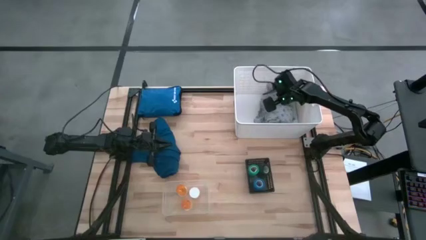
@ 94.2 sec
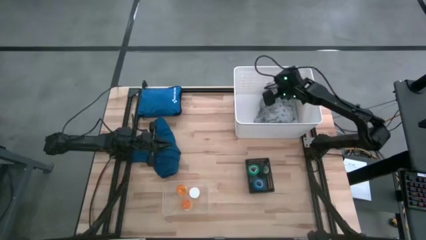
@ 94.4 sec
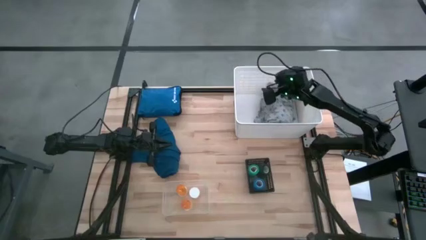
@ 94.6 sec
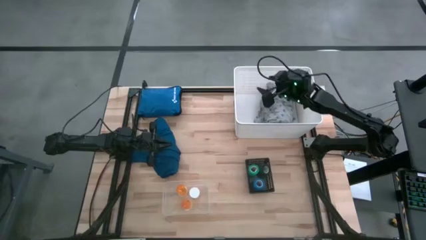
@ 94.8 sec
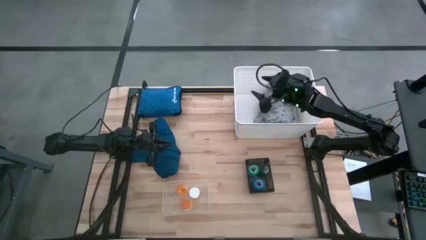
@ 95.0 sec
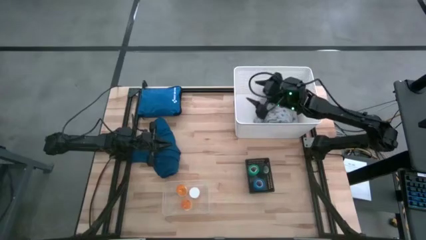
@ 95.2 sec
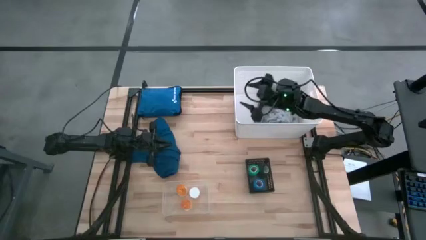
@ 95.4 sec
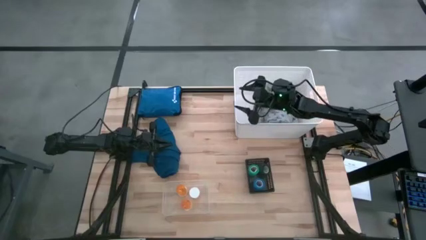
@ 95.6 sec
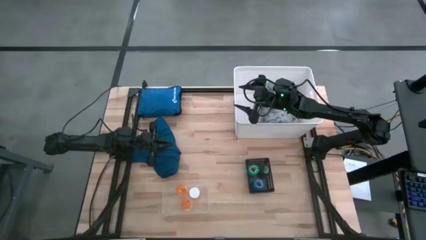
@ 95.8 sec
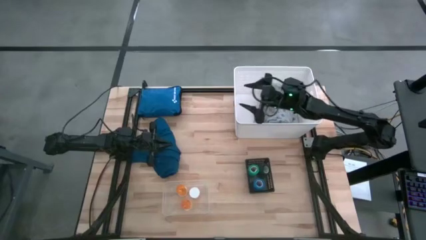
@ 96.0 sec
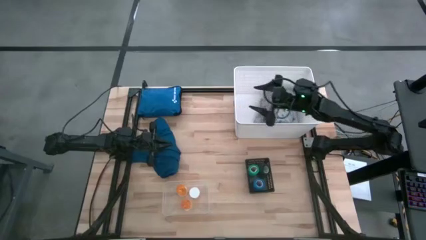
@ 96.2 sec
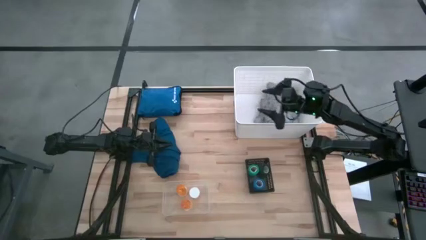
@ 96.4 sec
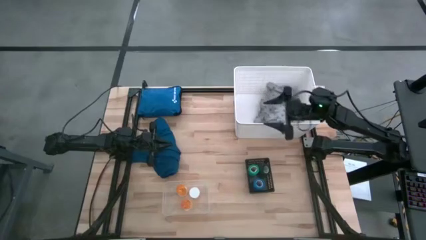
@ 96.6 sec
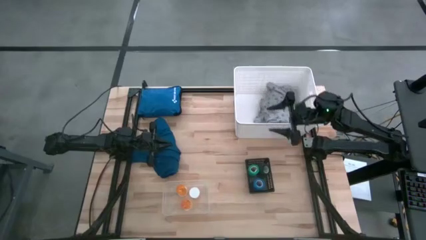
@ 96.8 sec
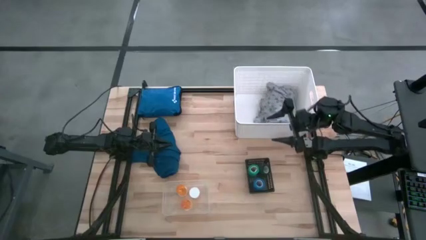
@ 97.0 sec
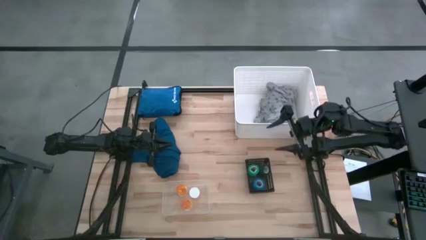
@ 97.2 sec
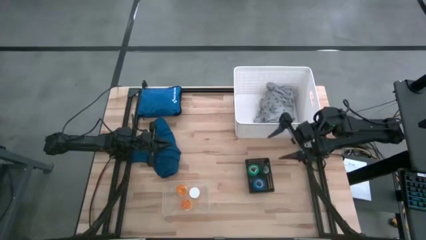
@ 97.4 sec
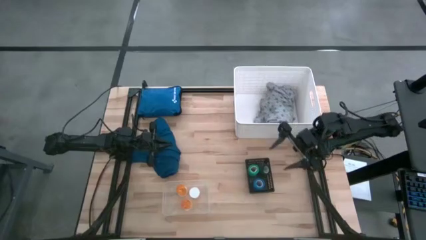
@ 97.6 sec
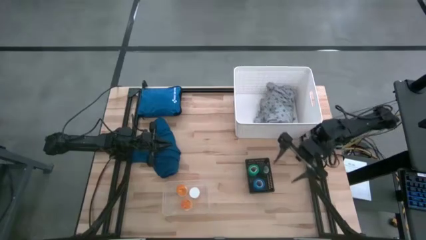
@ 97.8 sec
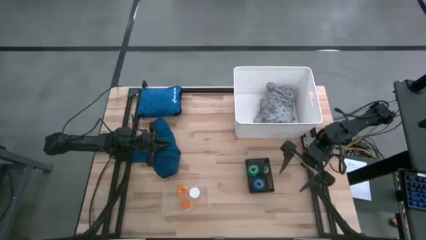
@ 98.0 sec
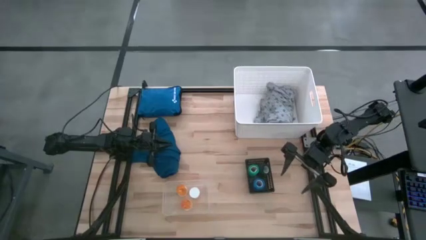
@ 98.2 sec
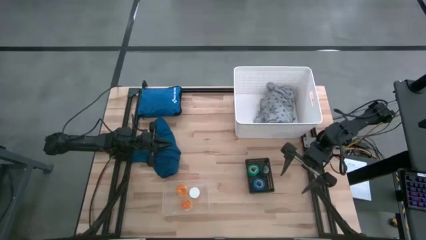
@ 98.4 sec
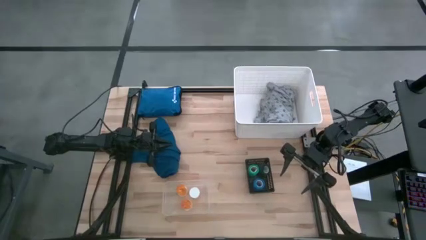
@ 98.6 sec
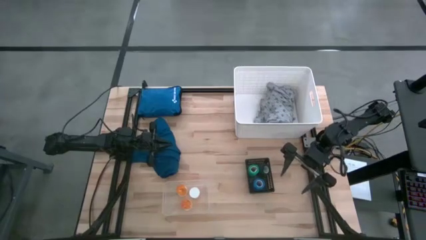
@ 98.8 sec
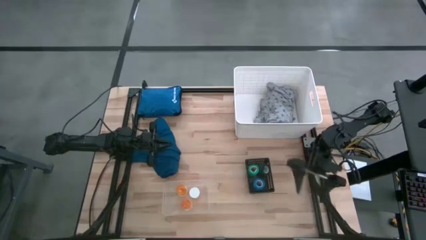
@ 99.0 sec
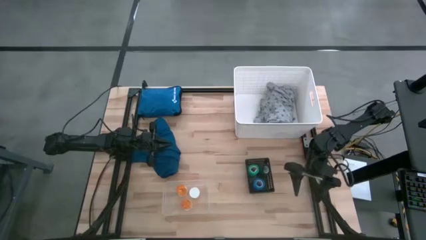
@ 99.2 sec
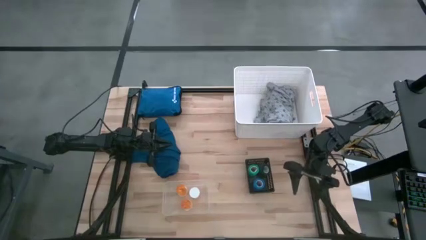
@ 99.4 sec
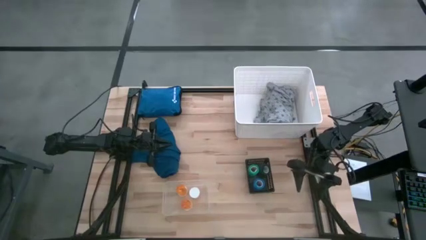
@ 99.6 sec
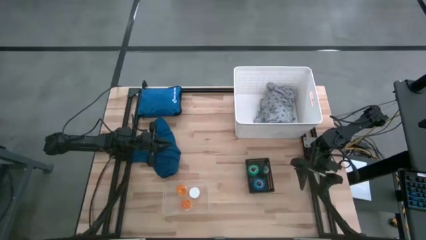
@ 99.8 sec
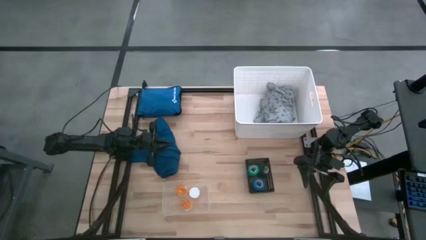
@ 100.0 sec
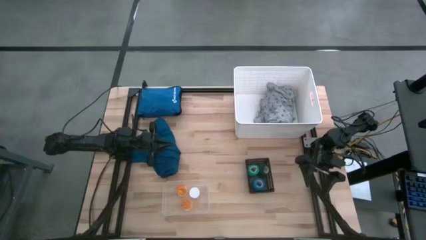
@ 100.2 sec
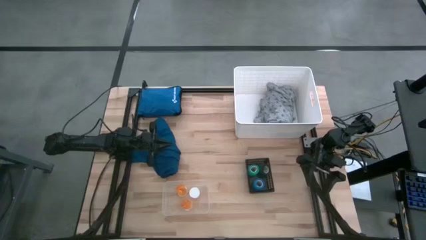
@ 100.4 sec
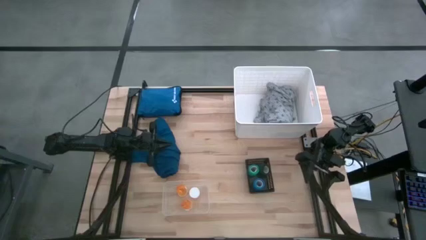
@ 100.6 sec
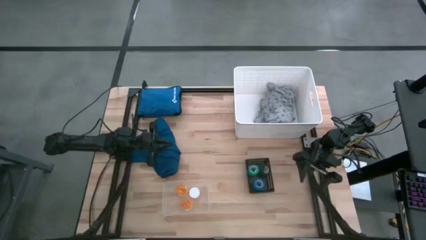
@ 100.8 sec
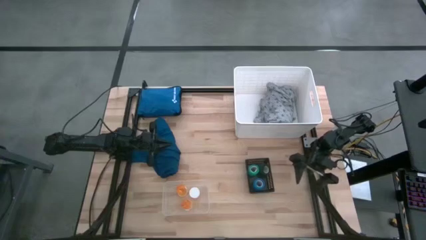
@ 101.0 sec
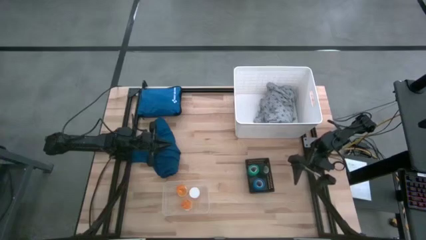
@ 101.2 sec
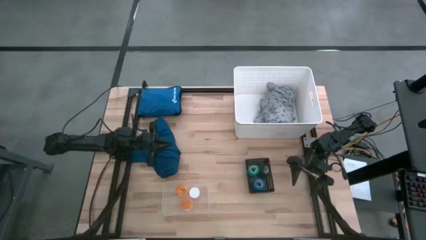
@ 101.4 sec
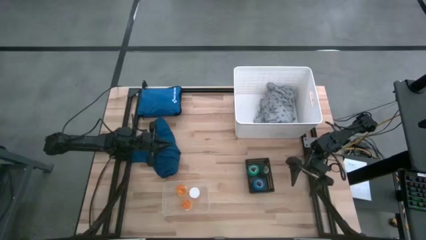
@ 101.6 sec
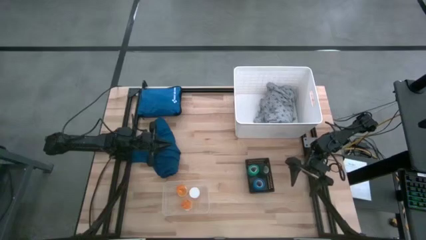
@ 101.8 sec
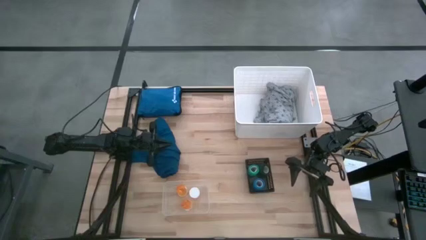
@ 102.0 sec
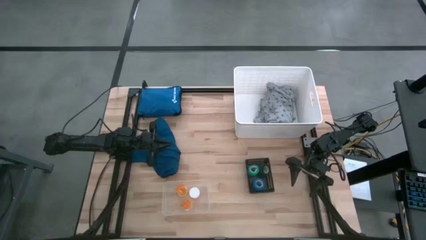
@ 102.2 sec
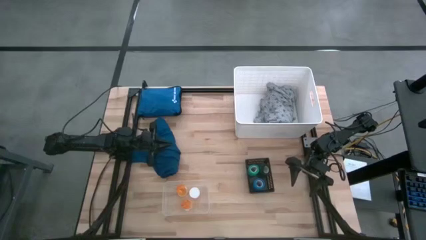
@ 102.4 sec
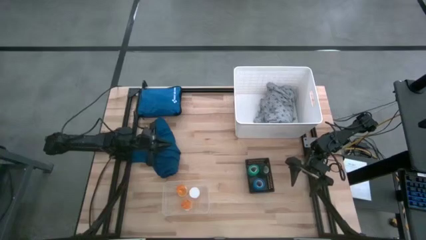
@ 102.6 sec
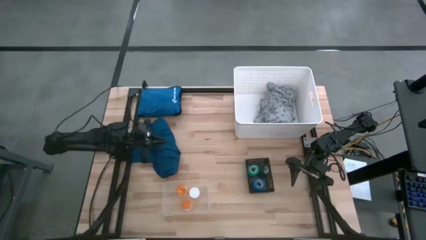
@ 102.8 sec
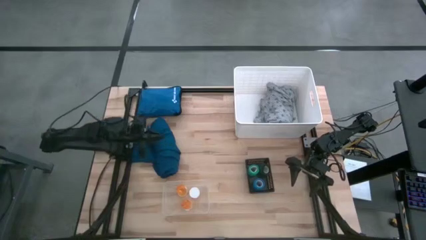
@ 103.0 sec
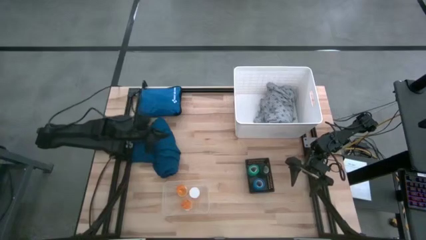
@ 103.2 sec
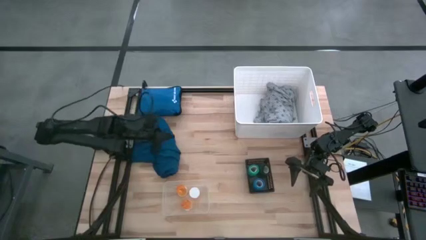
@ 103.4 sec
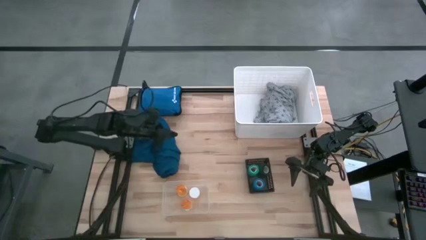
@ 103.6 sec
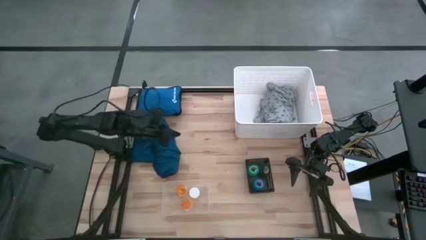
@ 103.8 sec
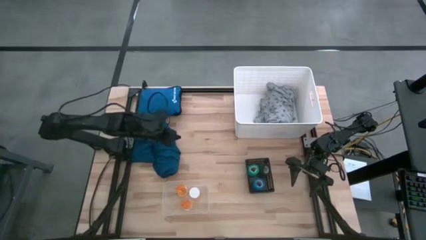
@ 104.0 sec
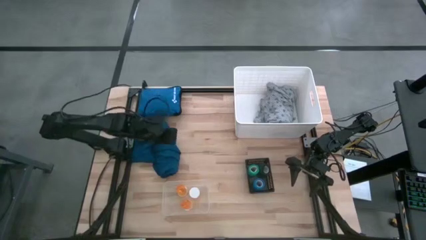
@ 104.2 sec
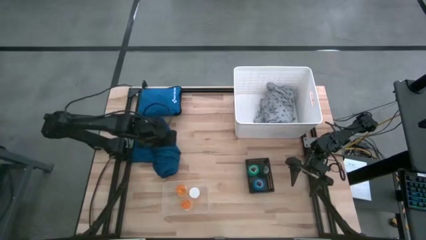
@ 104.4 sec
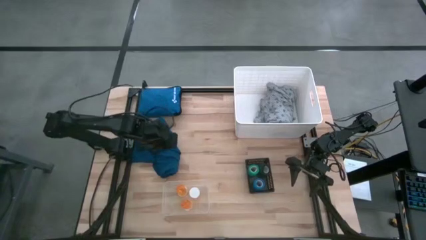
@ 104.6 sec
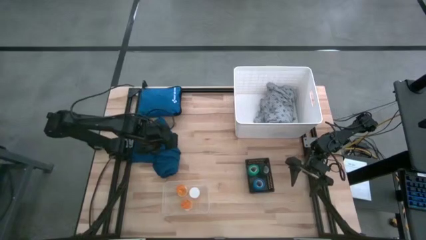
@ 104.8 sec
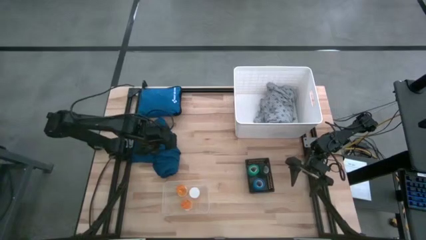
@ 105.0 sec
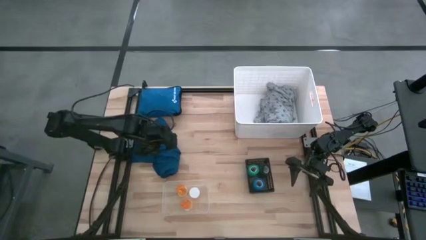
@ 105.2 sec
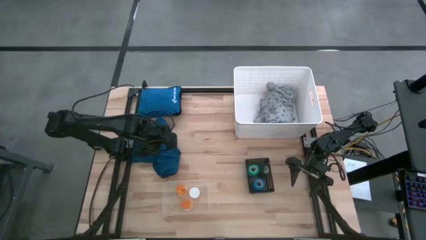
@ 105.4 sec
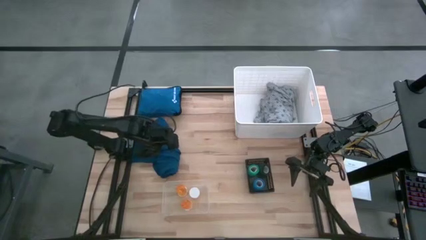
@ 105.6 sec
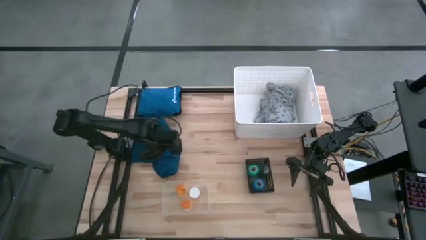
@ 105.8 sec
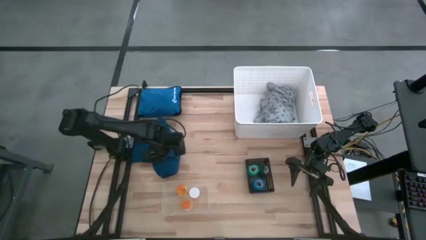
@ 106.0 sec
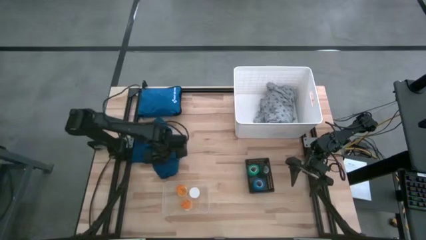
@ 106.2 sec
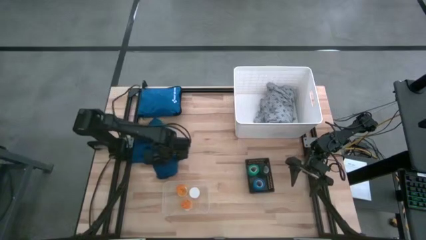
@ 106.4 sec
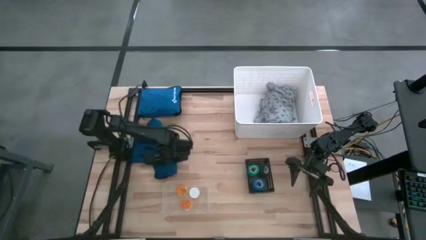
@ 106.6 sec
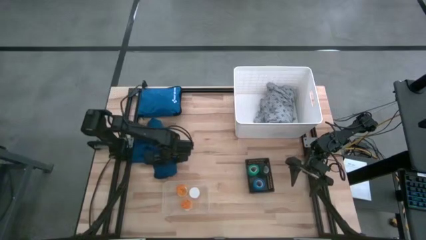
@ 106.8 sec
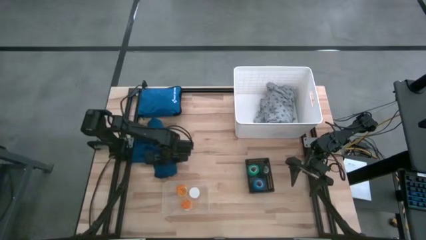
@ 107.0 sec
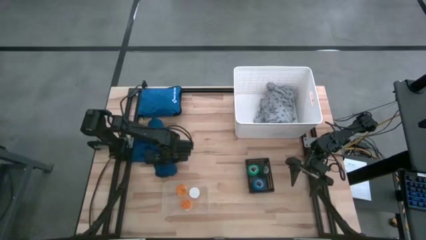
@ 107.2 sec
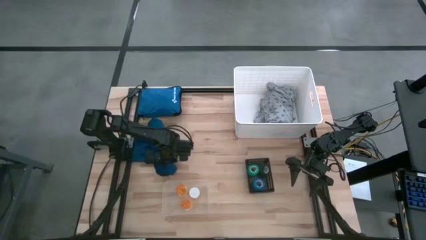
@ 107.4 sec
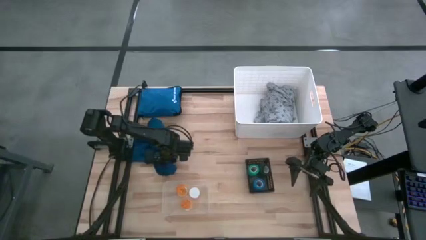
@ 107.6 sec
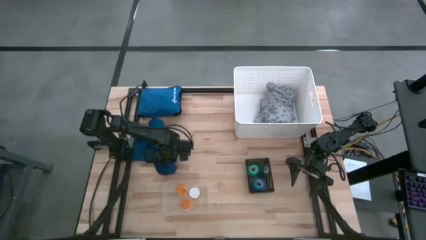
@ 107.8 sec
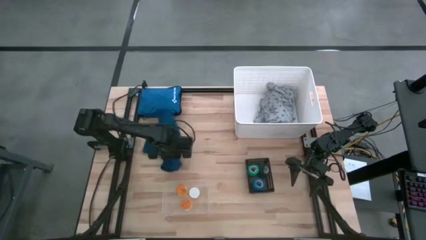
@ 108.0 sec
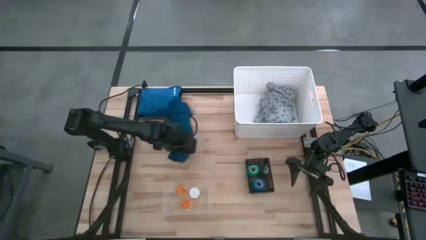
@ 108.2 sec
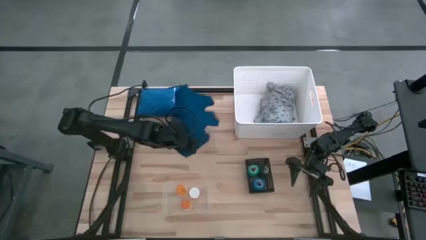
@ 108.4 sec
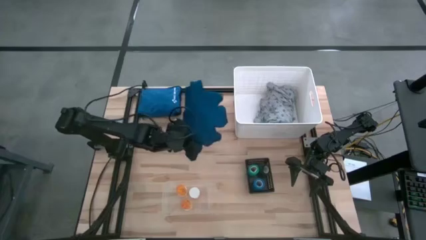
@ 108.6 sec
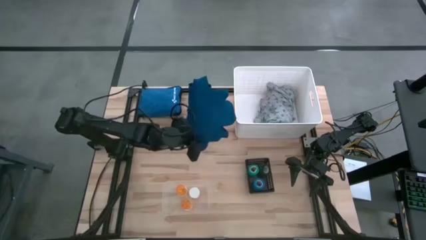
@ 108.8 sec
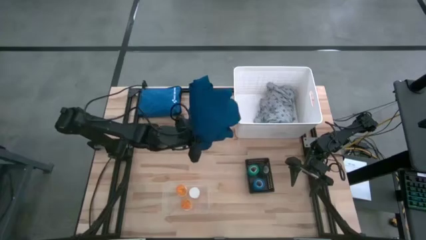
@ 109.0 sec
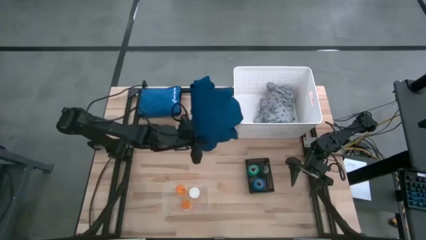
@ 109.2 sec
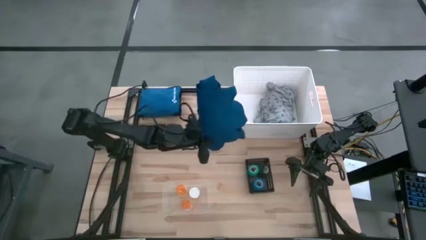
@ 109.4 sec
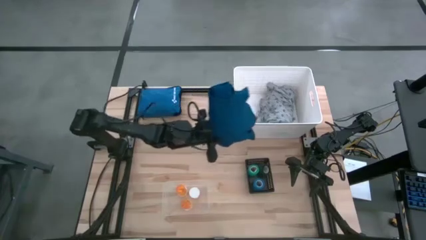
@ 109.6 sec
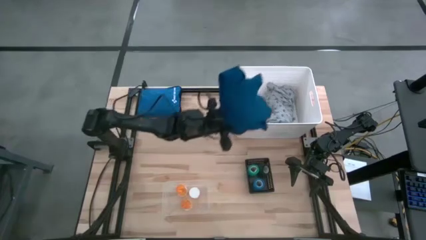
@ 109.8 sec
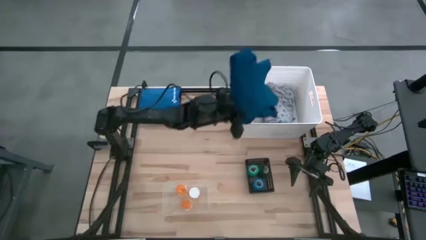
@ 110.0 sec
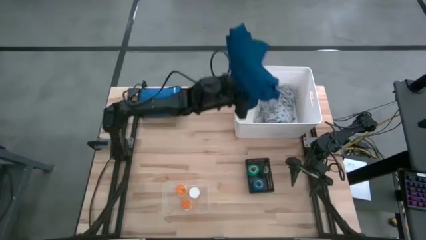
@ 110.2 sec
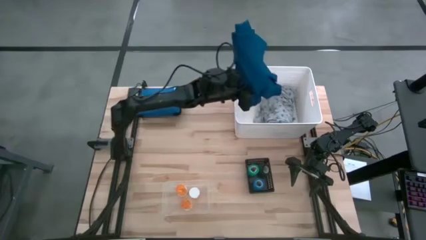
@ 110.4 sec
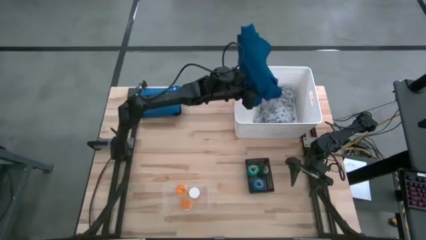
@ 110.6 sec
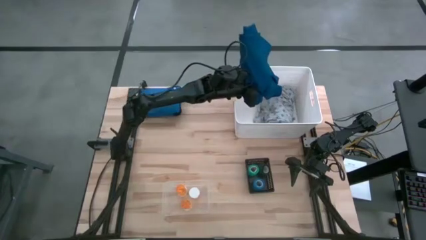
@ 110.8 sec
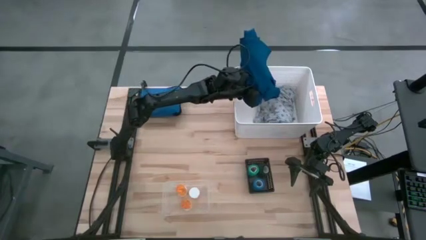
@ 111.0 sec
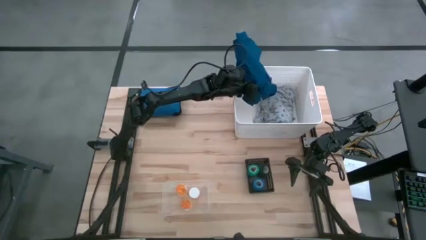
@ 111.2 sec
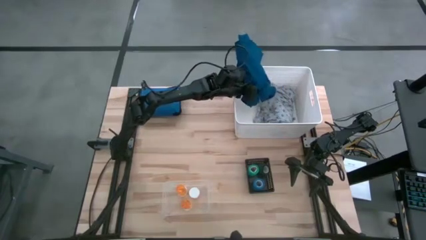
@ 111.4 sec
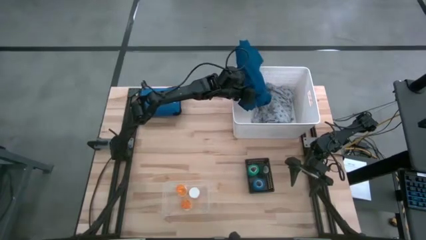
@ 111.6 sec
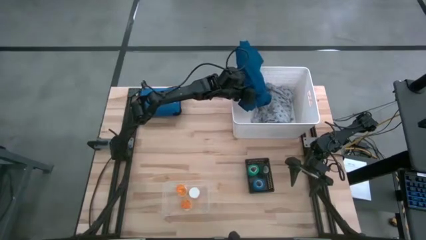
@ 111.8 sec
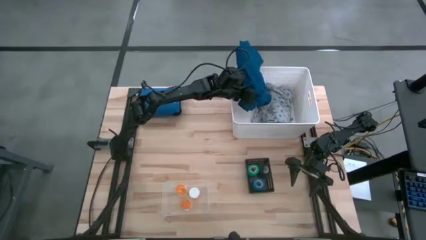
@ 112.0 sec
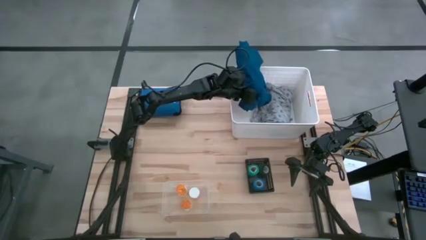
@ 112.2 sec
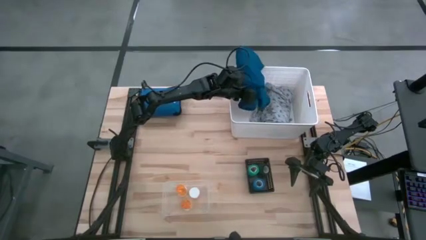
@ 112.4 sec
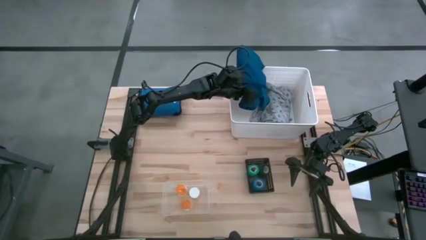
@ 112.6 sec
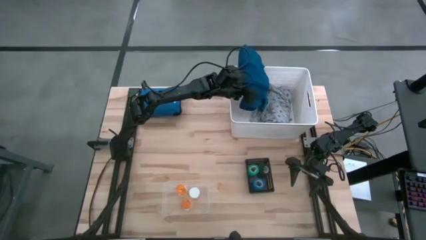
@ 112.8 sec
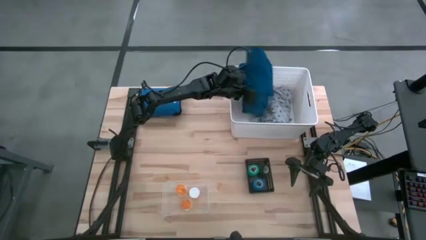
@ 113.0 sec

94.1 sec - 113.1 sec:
Task: Pick & place medical supplies in basket/bin
Put the blue patient gown into the white bin
